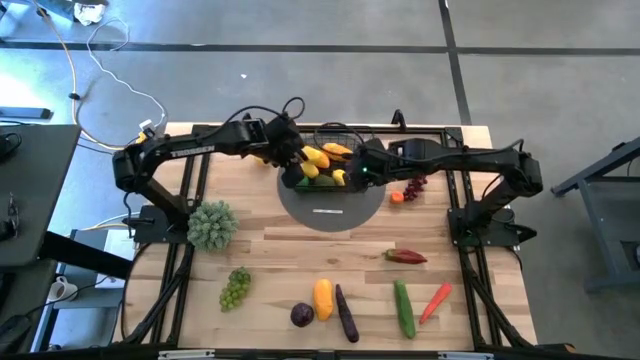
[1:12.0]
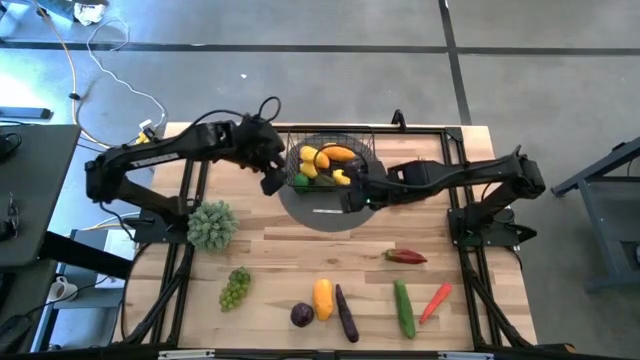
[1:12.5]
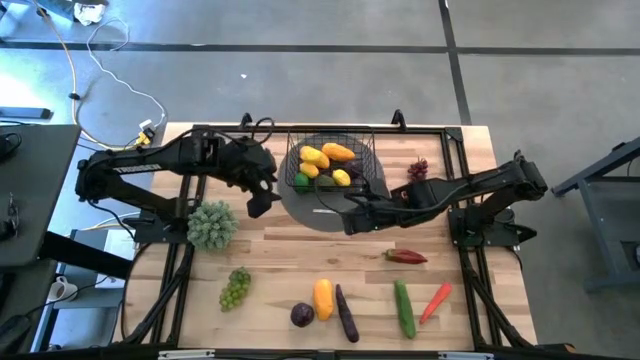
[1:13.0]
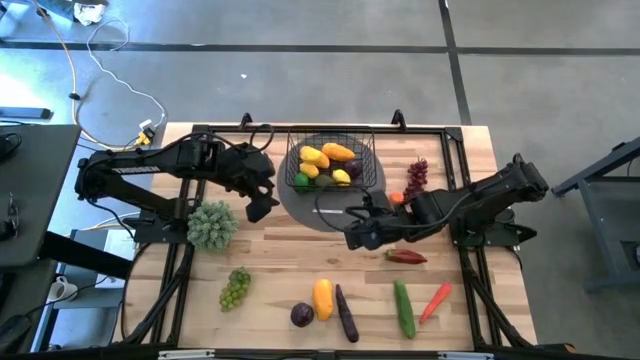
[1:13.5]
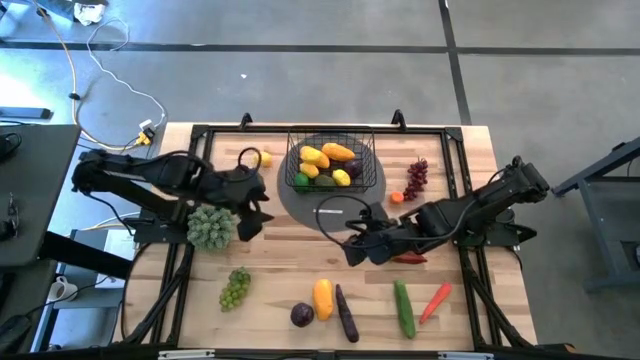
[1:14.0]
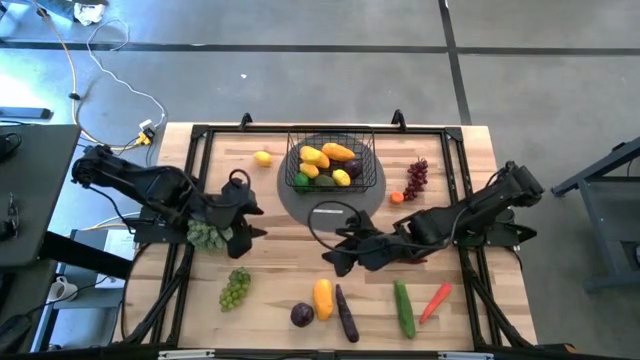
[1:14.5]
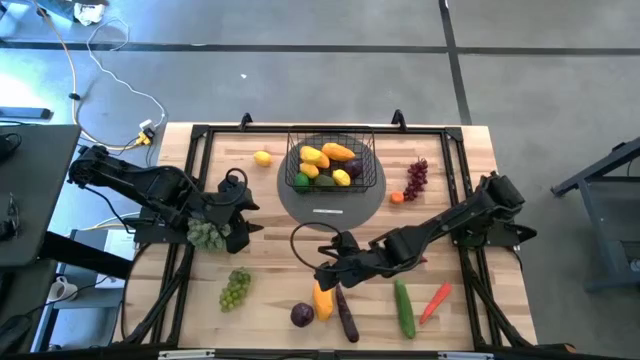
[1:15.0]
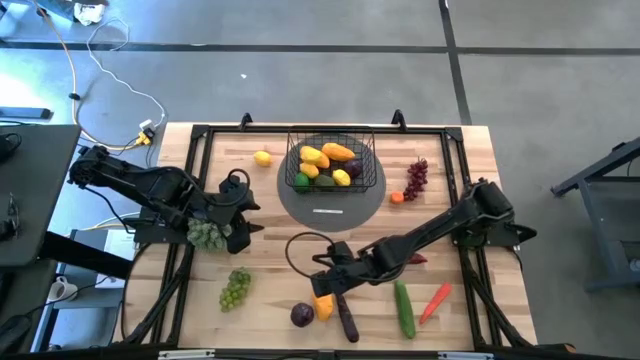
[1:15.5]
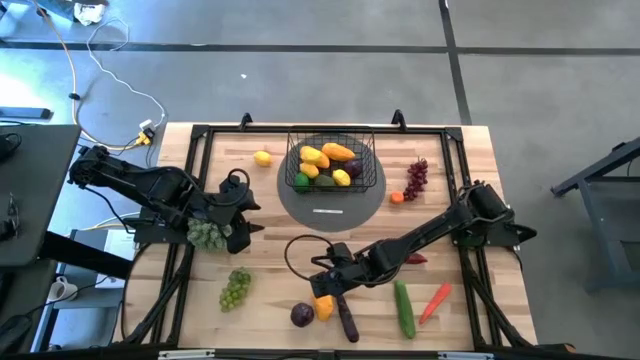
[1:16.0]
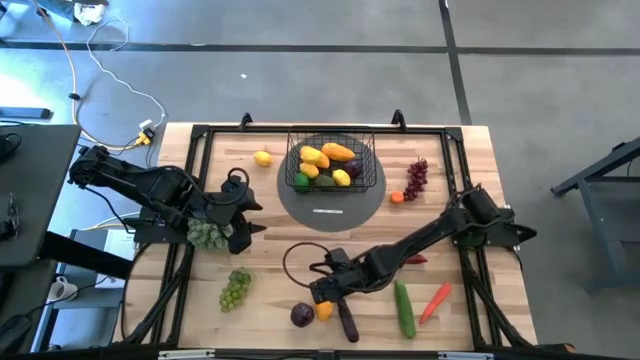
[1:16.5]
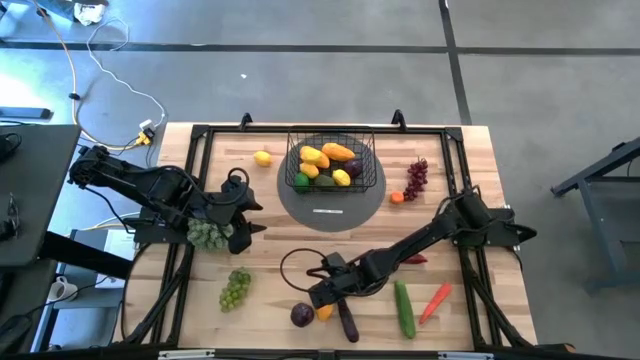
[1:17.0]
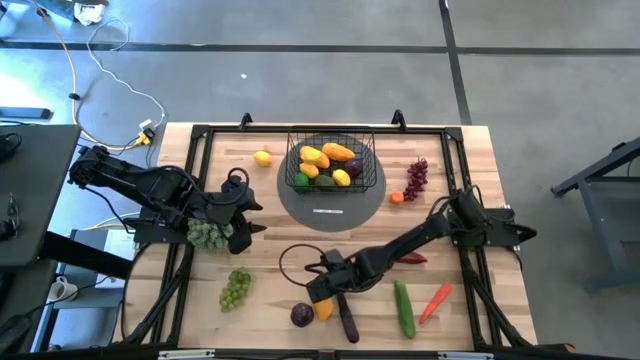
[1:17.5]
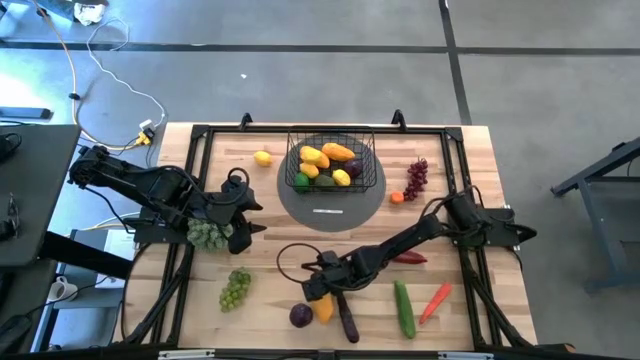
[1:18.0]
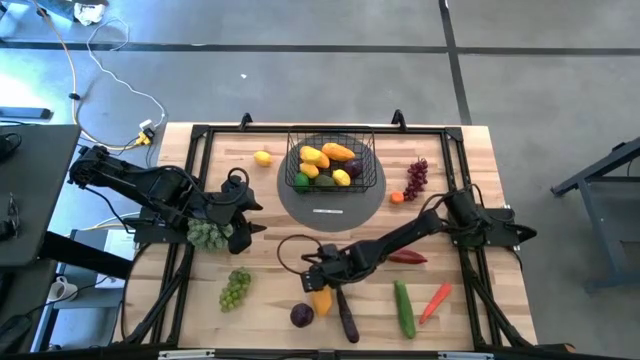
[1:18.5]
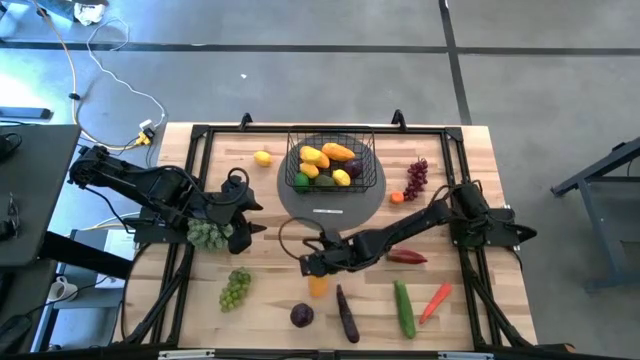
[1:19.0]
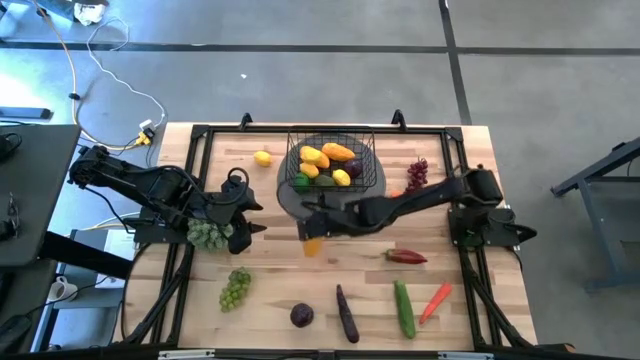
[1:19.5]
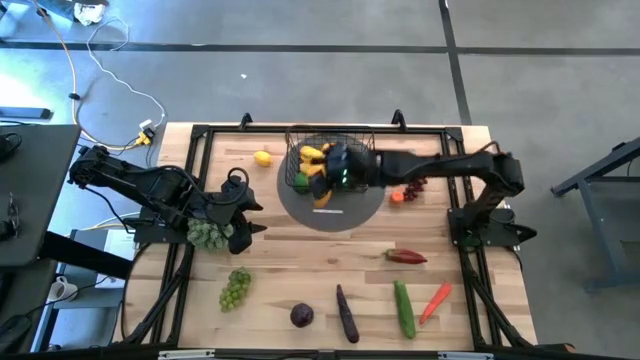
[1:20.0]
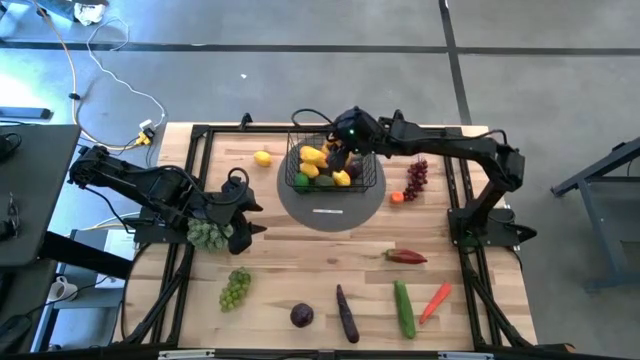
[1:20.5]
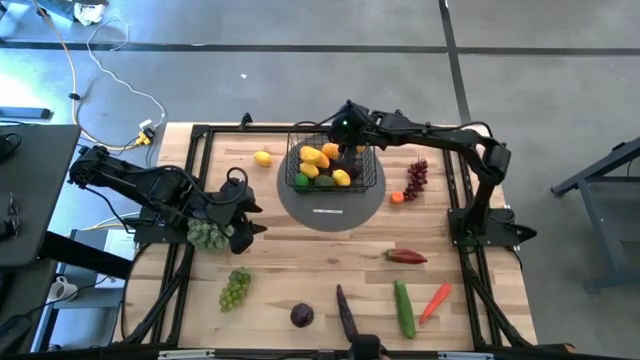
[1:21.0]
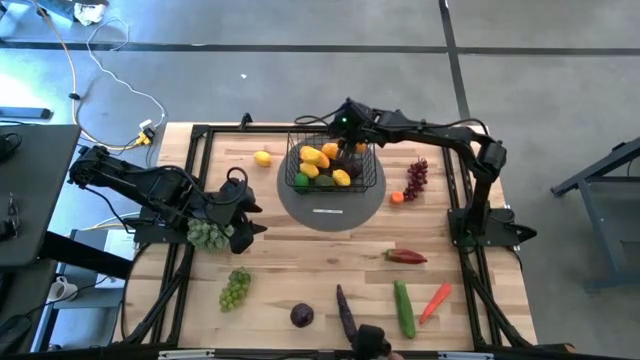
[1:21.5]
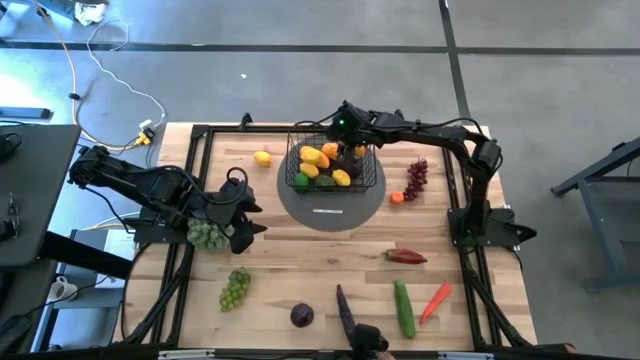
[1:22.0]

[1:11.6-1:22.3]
Task: Build produce basket
Put the yellow mango into the wire basket

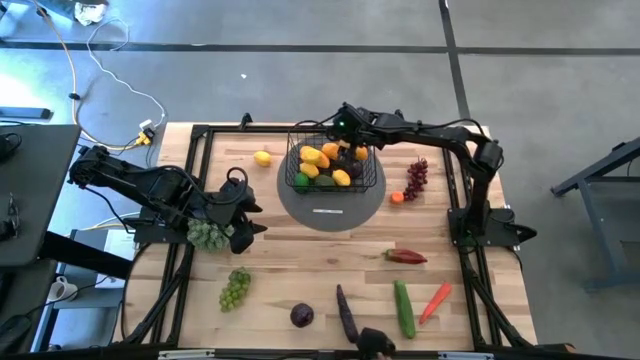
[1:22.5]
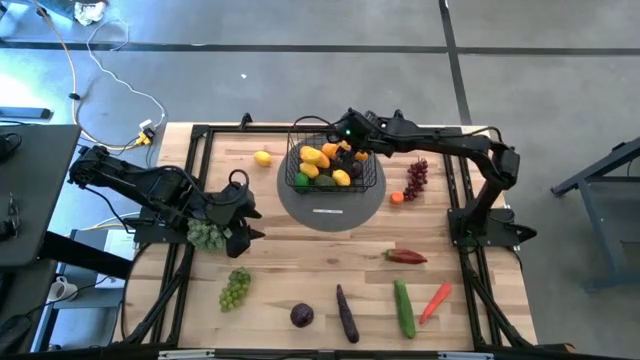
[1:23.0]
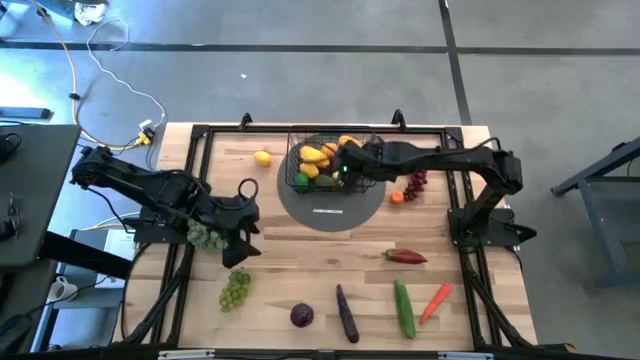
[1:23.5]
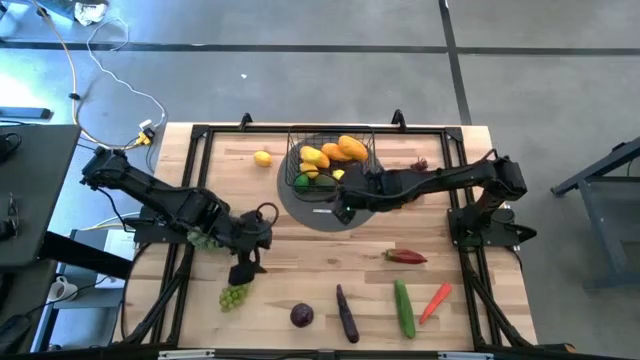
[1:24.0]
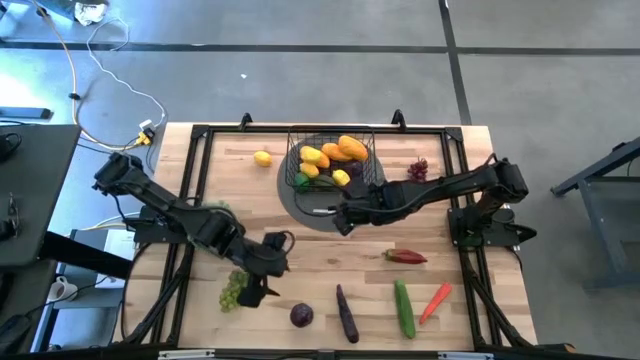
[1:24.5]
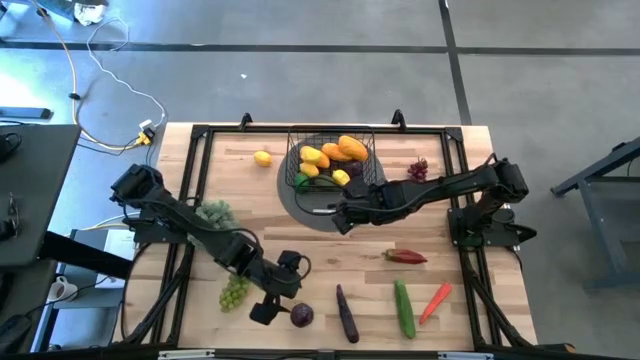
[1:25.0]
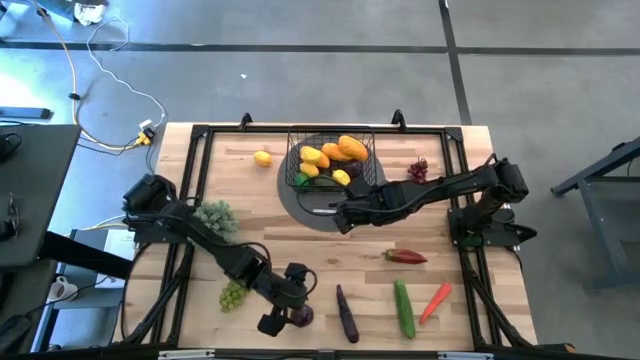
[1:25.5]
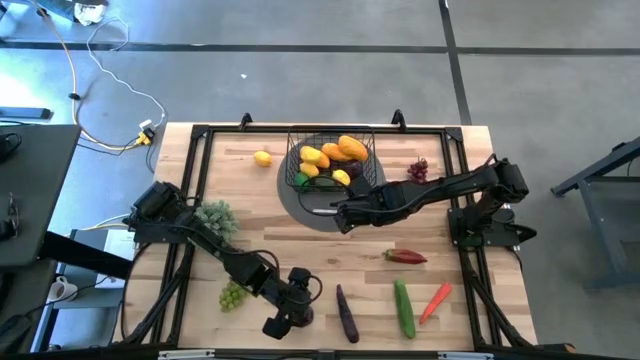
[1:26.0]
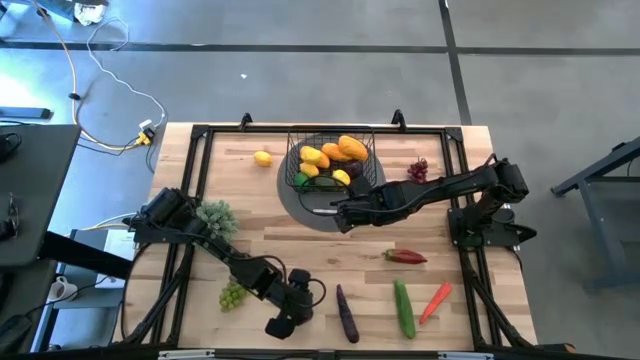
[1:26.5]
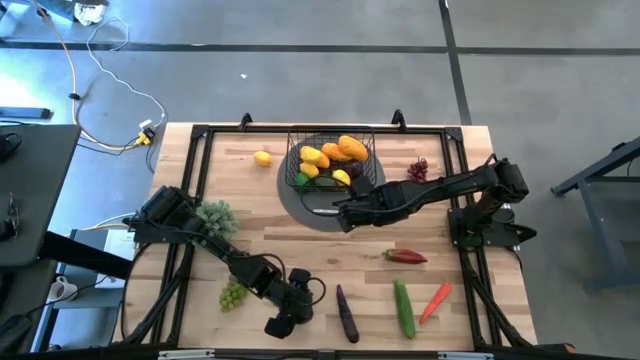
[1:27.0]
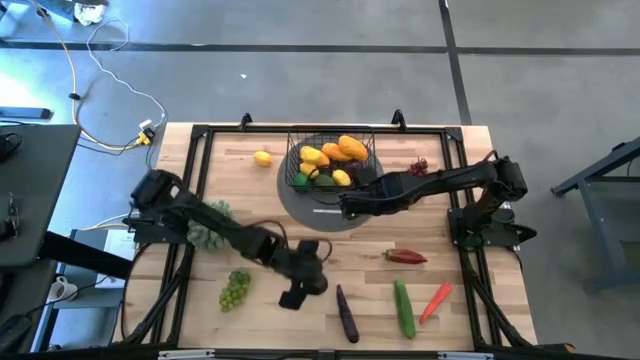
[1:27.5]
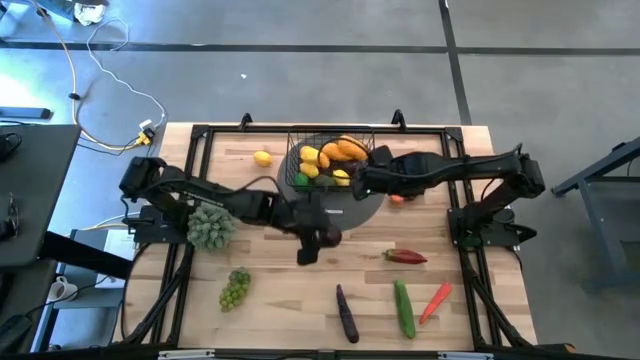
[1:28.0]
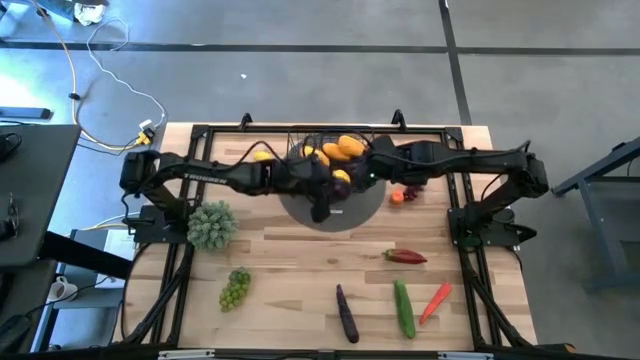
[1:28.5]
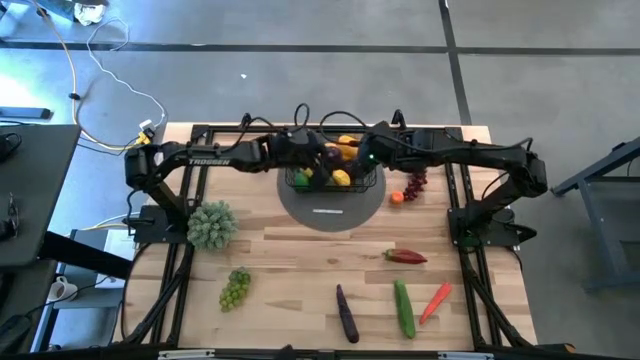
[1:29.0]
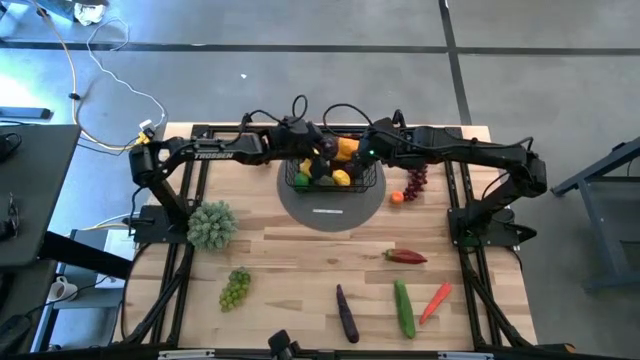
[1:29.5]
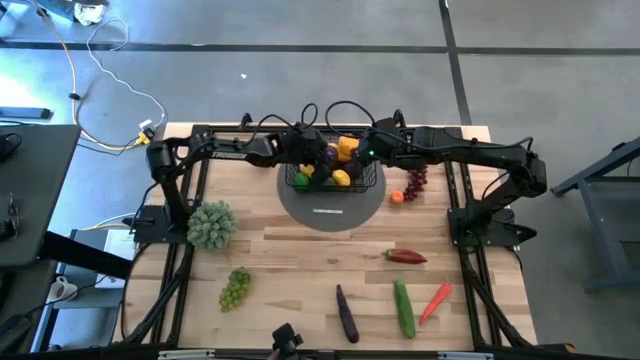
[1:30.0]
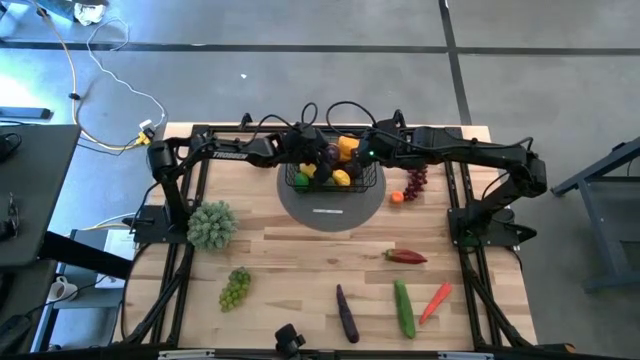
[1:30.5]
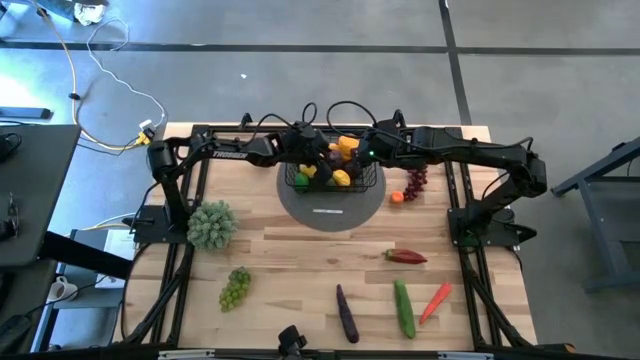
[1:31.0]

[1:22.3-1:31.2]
Put the violet plum into the wire basket

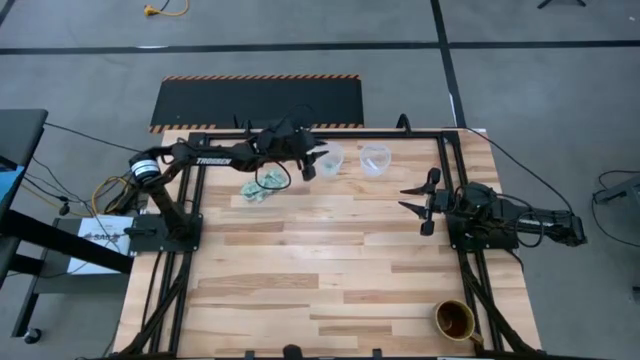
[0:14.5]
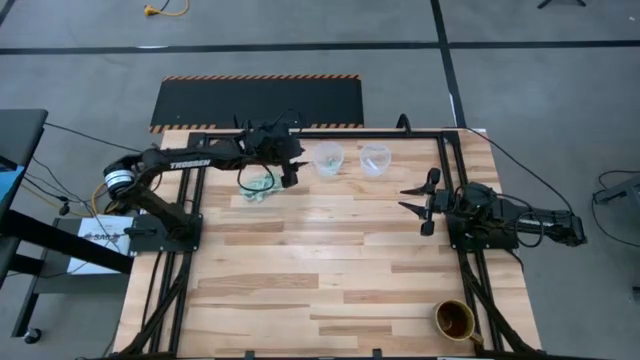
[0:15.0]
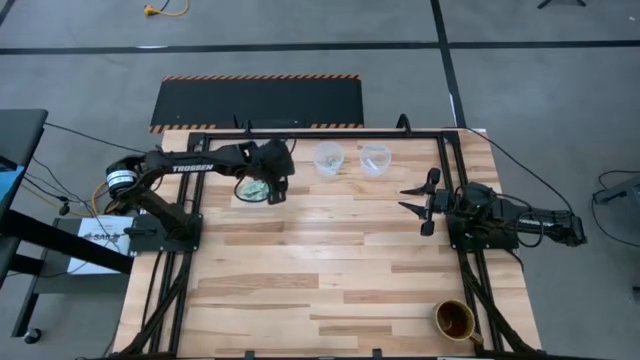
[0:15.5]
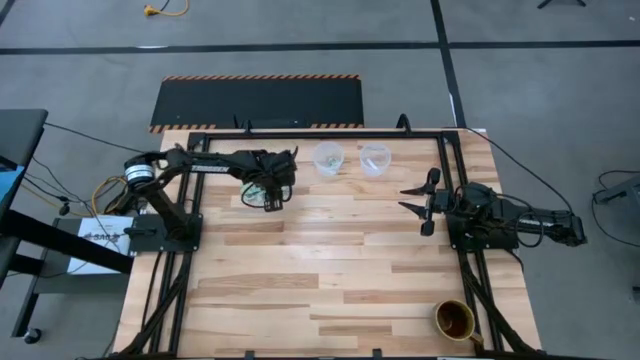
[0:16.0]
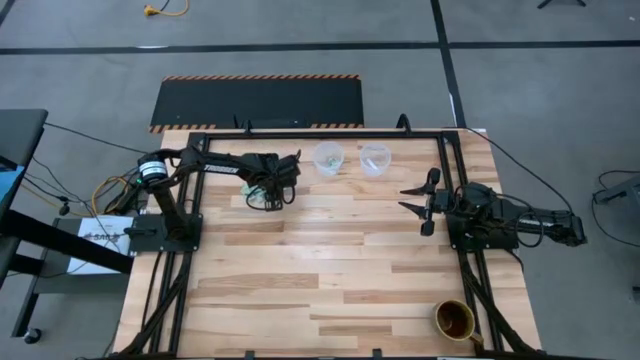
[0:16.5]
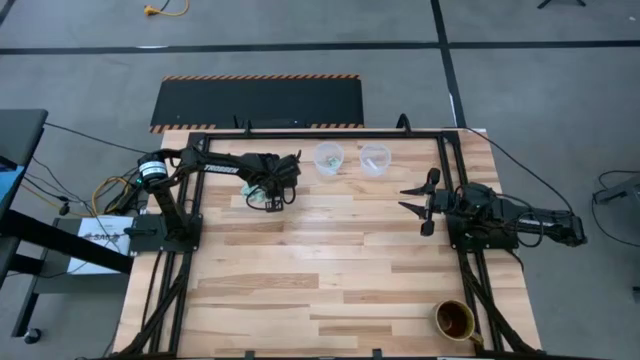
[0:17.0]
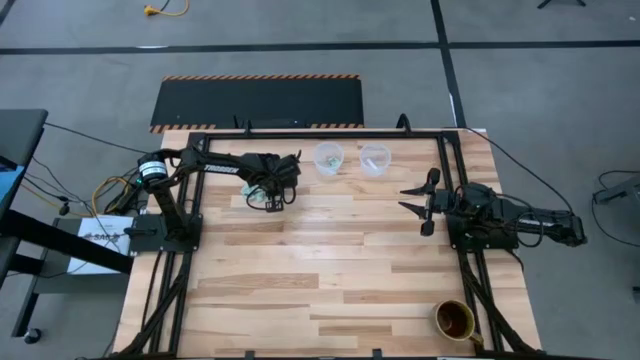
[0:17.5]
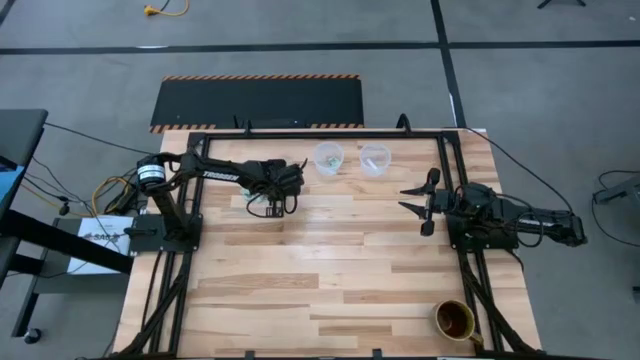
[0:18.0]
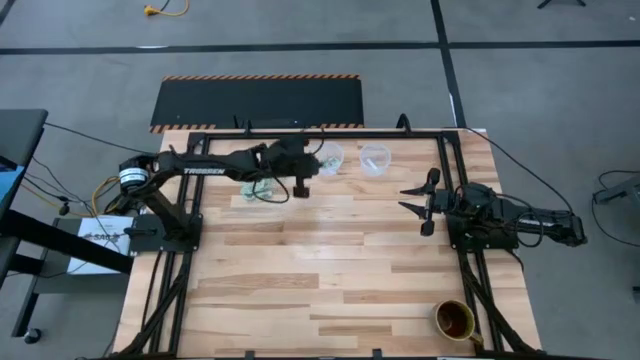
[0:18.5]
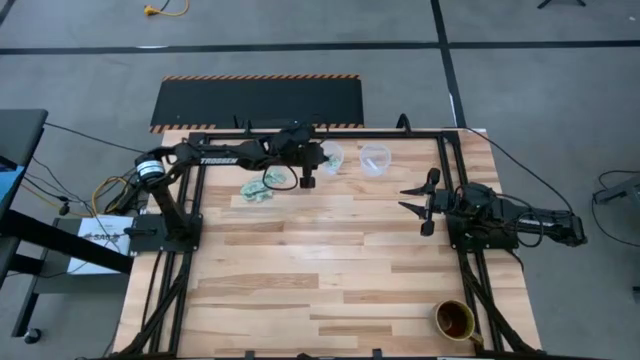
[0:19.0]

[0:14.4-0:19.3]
Task: Pick and place Stevia / Truvia into bins
Put the stevia packet into the left transparent container
